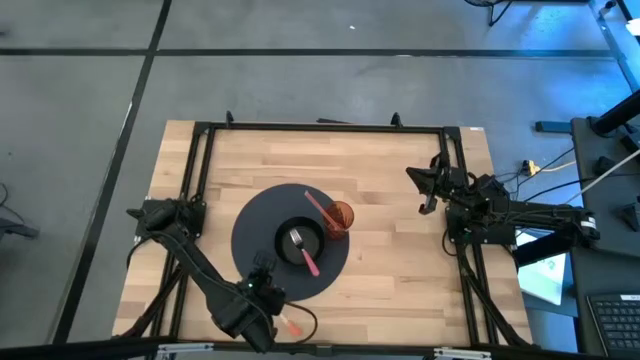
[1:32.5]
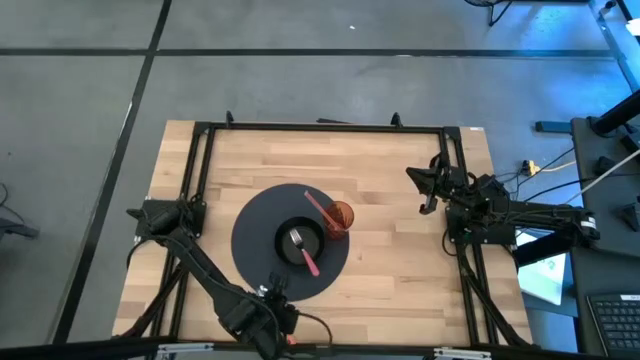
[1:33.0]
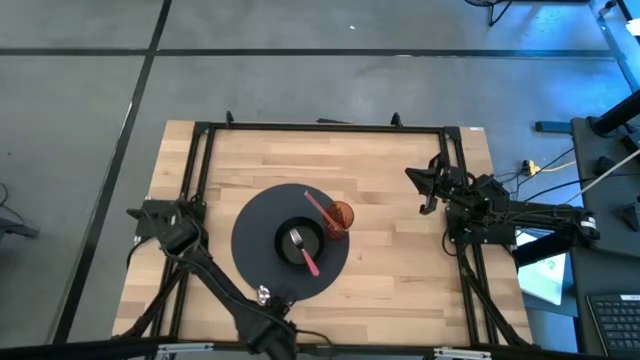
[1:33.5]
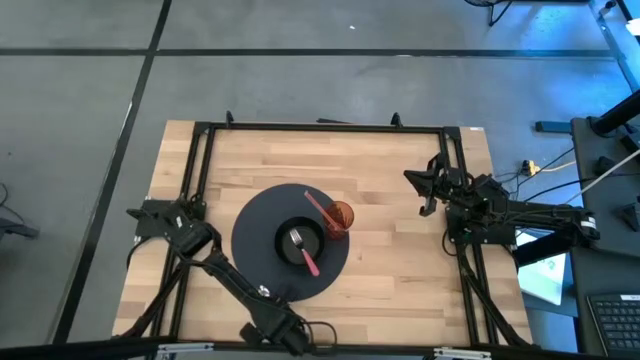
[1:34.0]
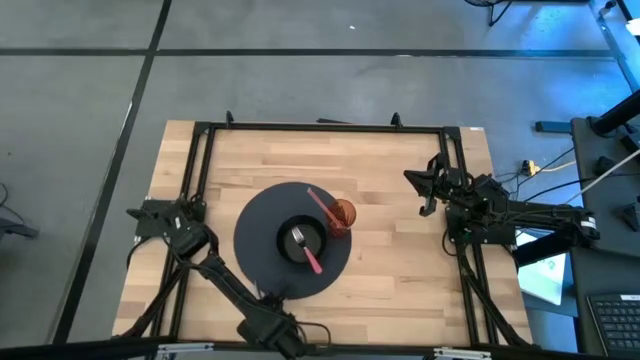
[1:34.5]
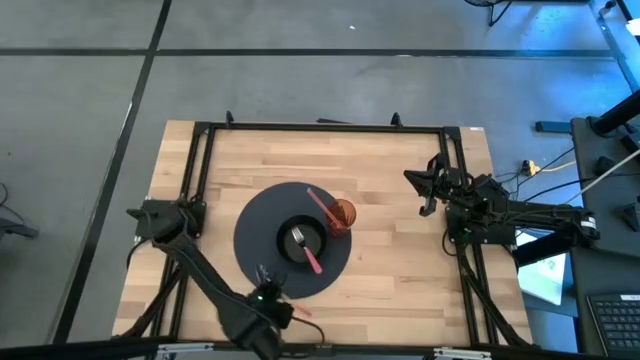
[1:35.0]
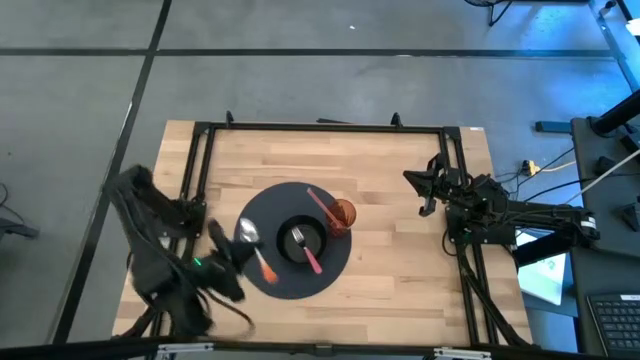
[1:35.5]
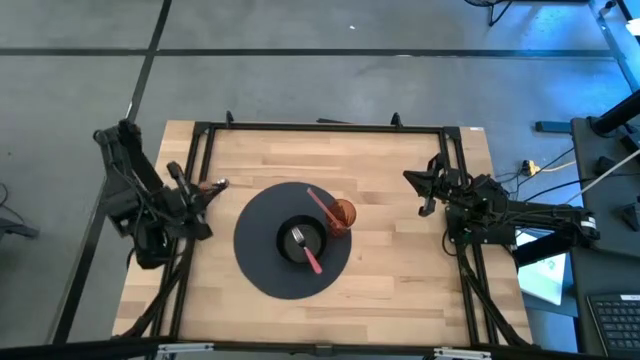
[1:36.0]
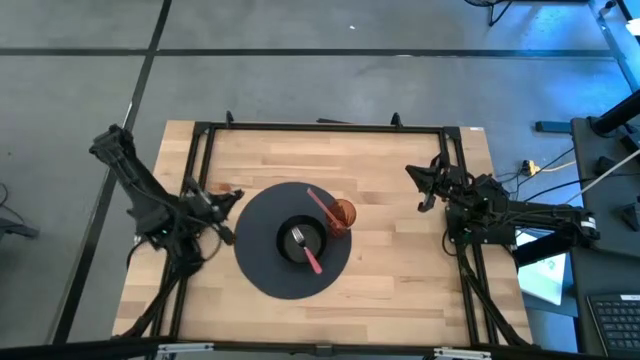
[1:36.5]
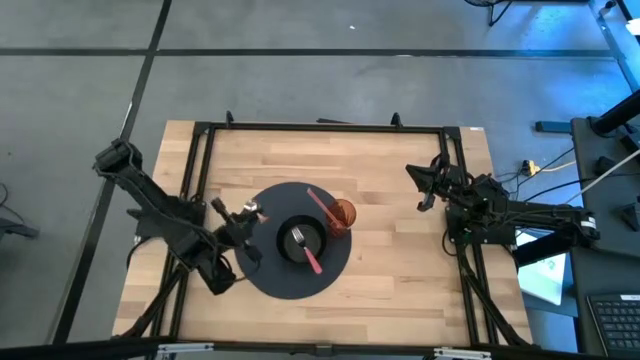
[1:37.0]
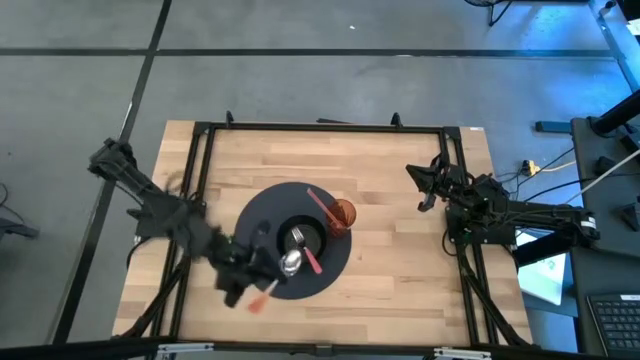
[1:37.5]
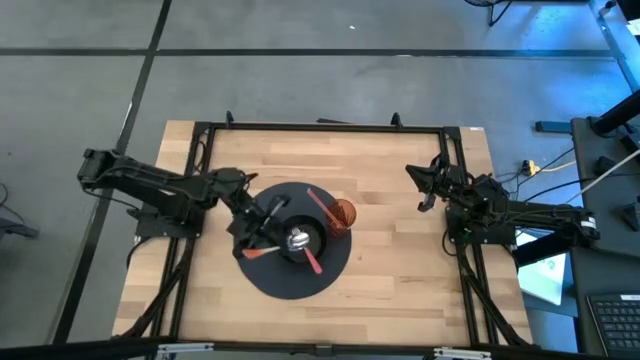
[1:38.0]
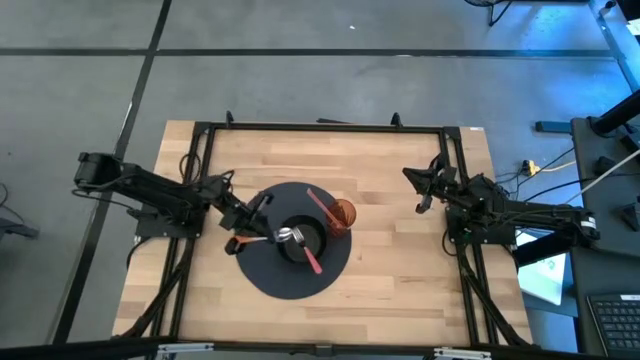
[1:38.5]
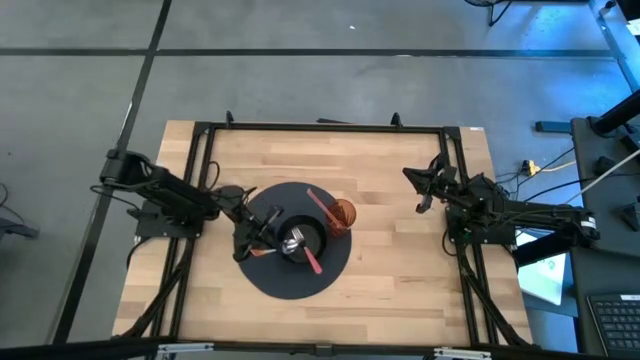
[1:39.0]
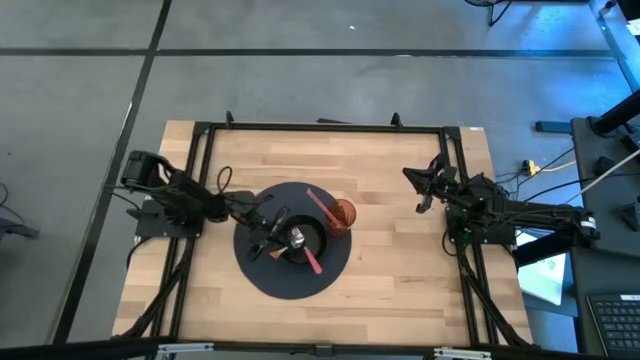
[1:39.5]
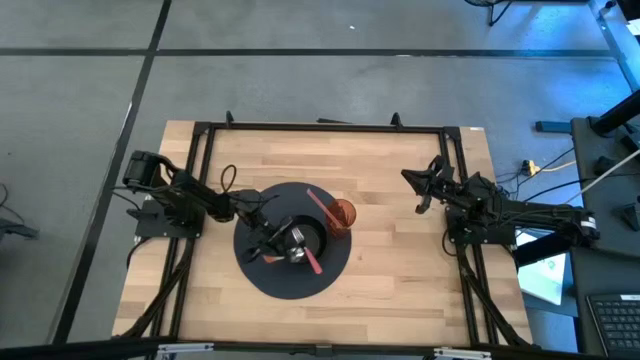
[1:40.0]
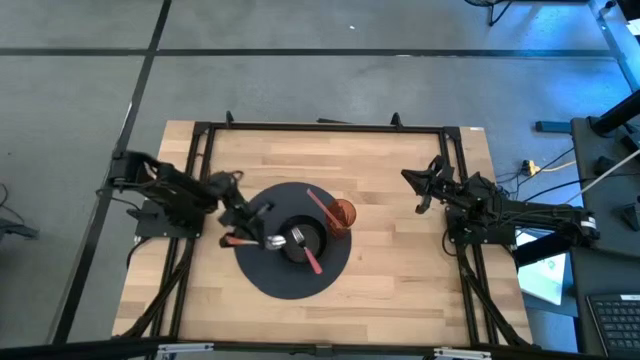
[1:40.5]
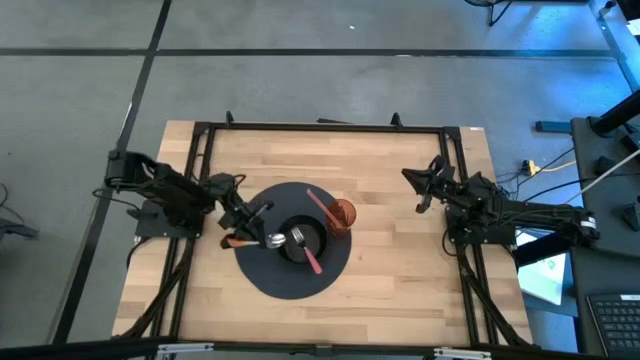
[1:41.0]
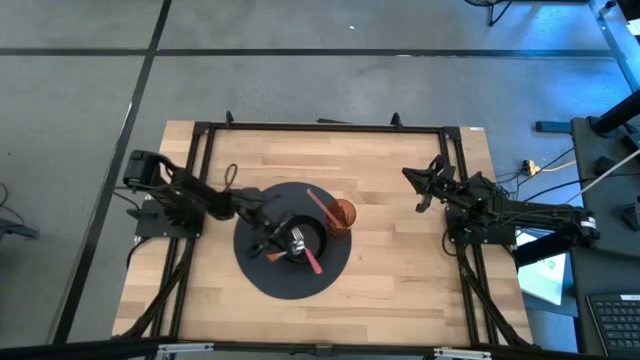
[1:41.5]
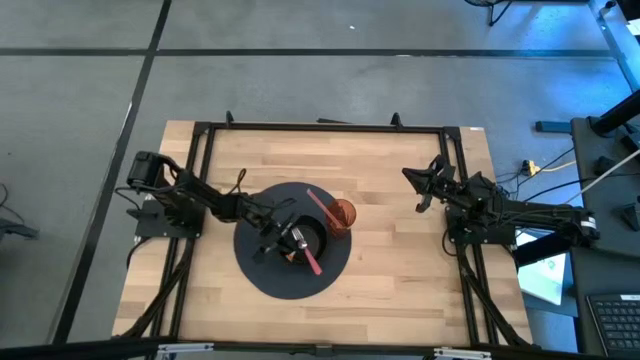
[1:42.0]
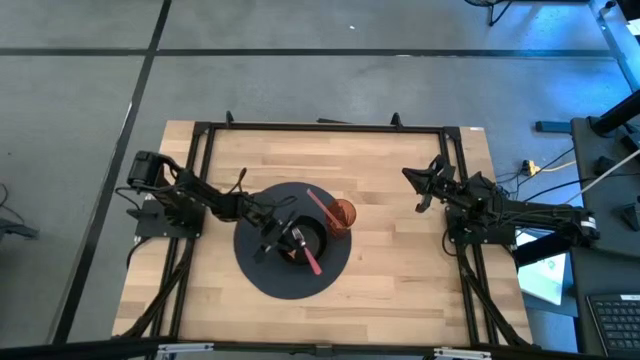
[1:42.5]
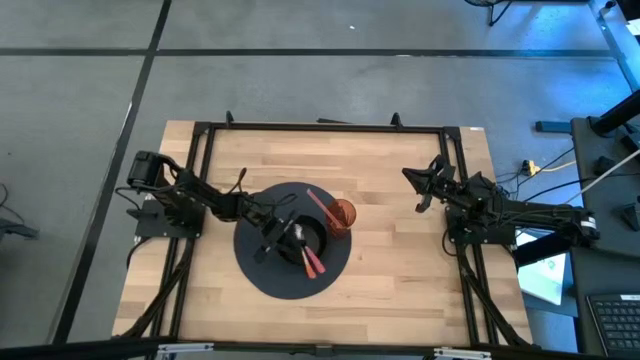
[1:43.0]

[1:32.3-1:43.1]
Task: Pick & Place Utensil
Put the orange spoon into the black bowl

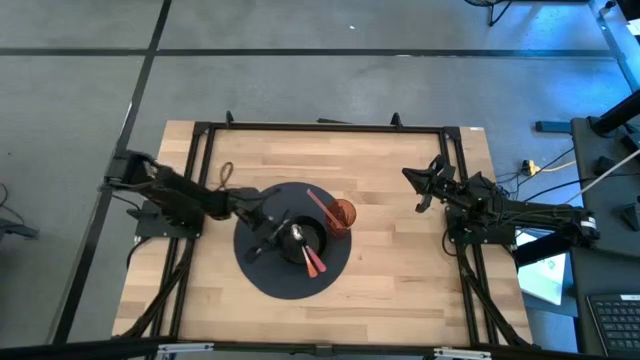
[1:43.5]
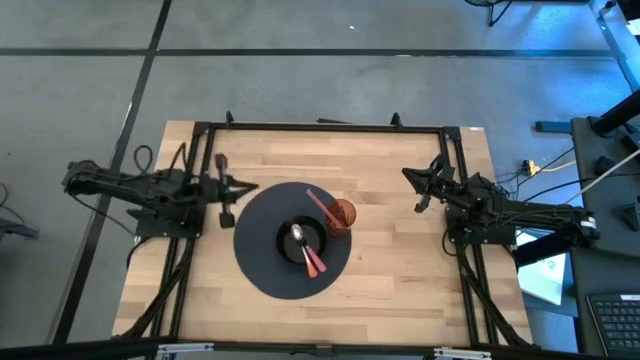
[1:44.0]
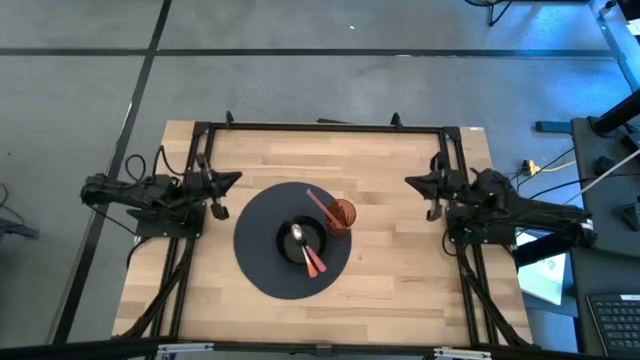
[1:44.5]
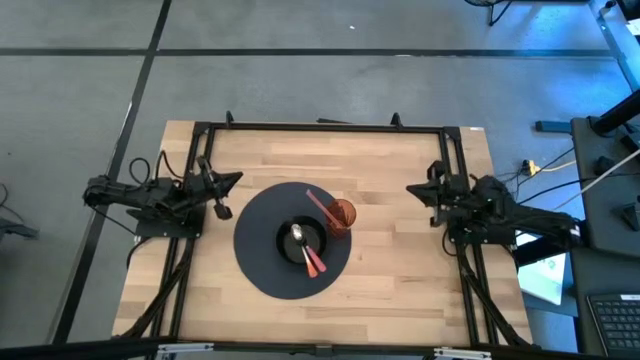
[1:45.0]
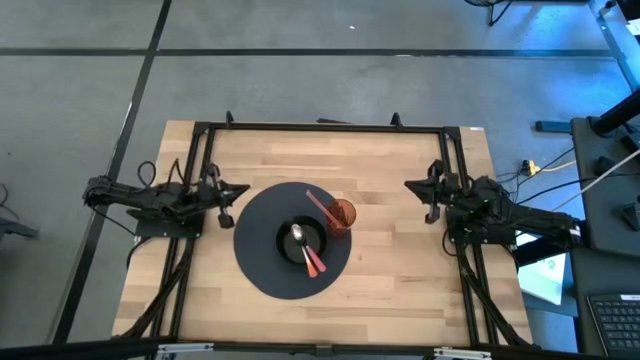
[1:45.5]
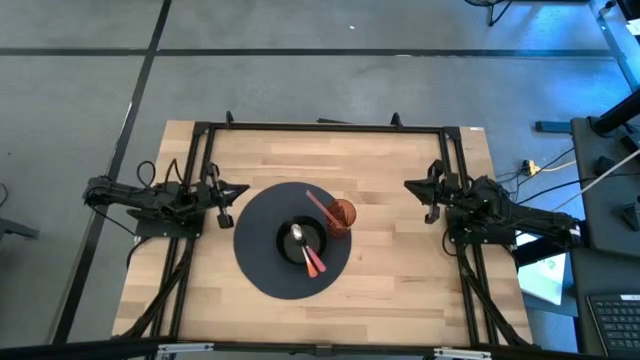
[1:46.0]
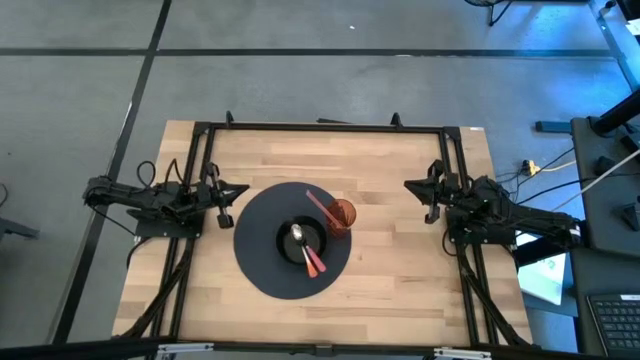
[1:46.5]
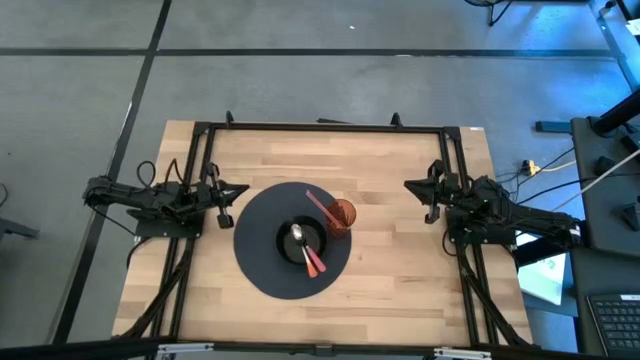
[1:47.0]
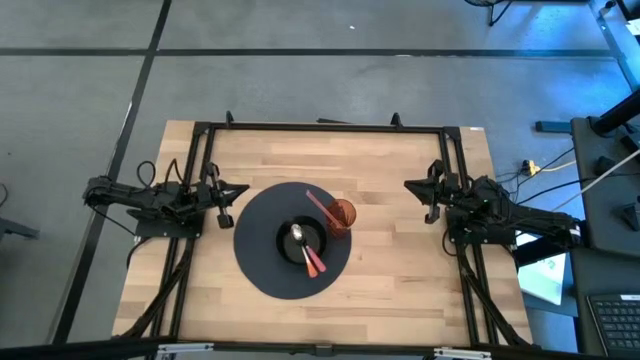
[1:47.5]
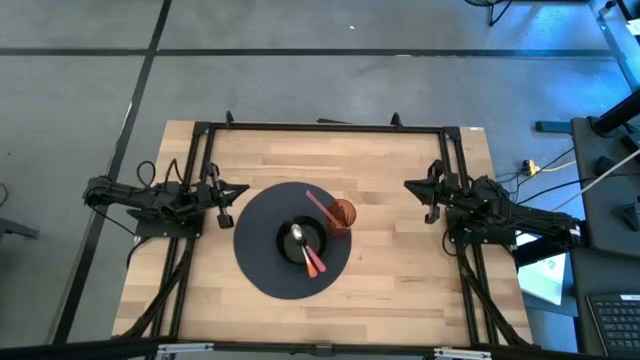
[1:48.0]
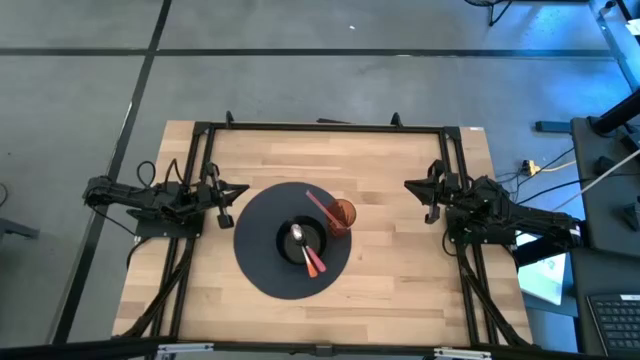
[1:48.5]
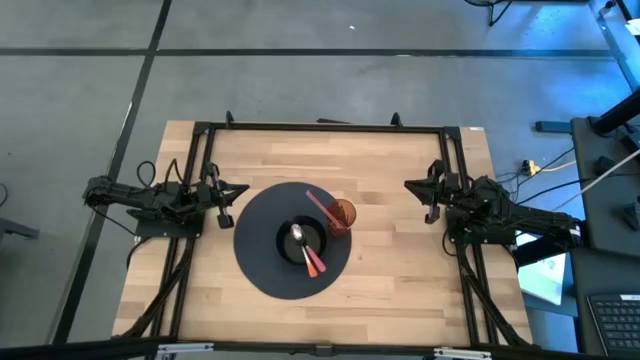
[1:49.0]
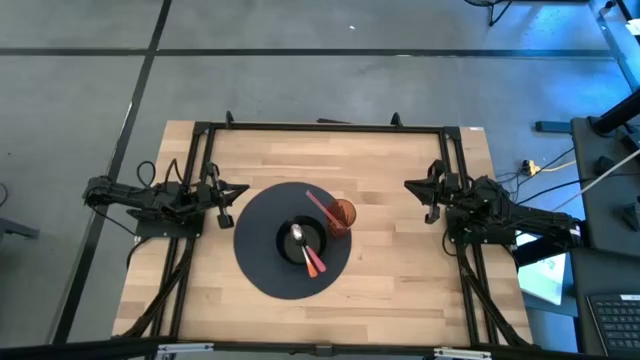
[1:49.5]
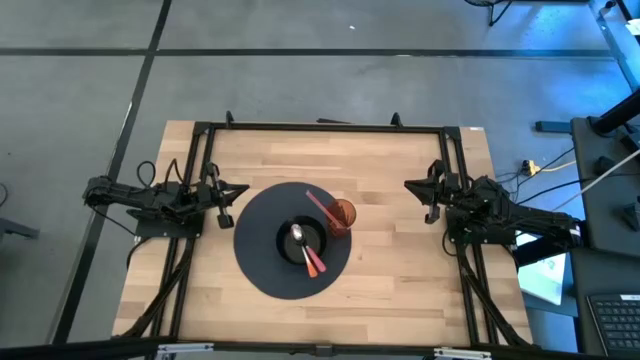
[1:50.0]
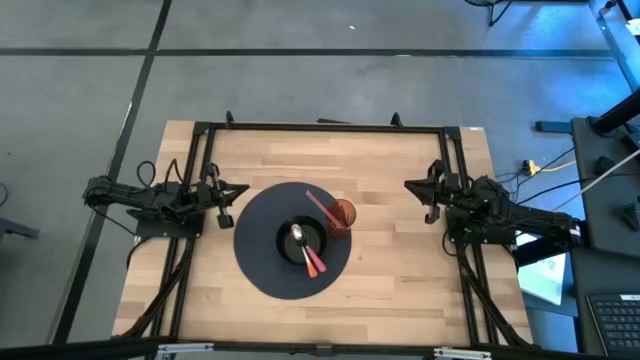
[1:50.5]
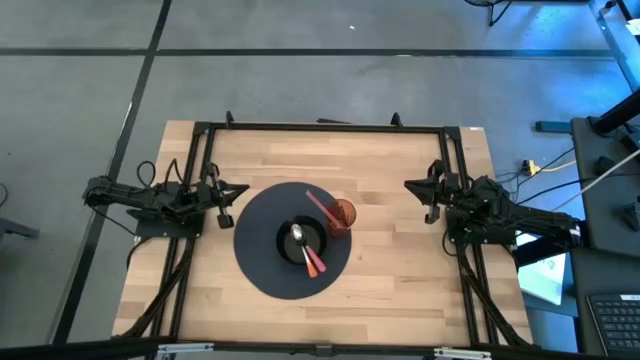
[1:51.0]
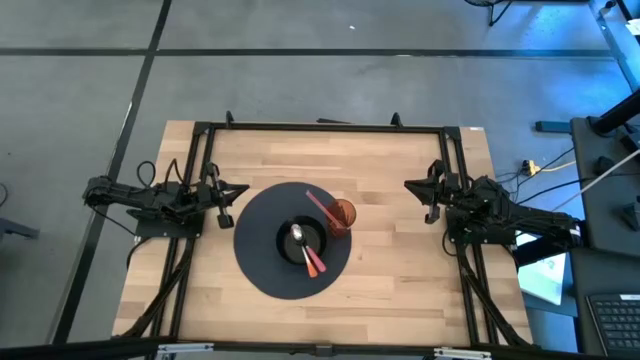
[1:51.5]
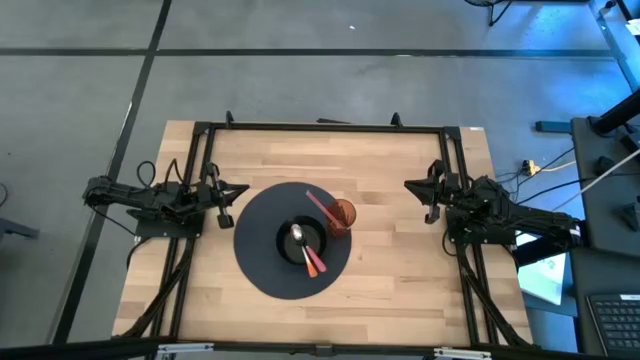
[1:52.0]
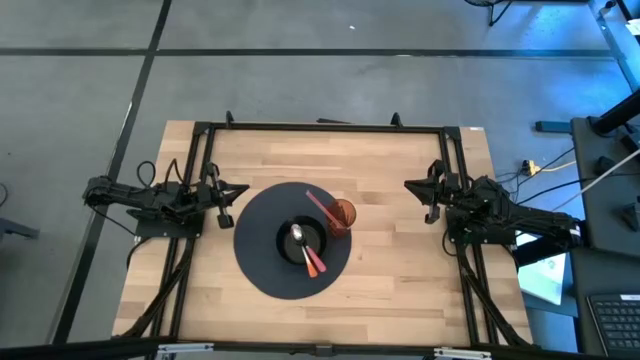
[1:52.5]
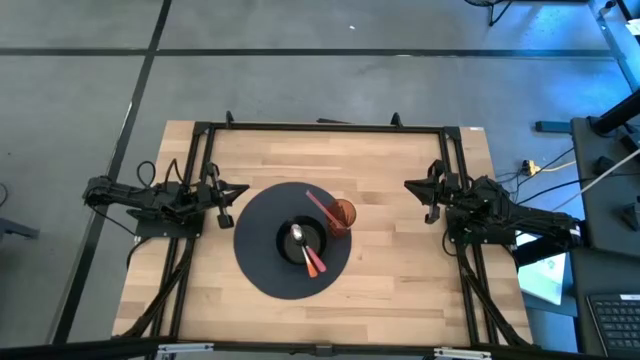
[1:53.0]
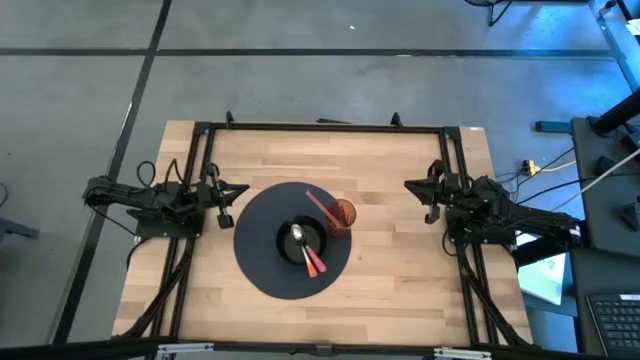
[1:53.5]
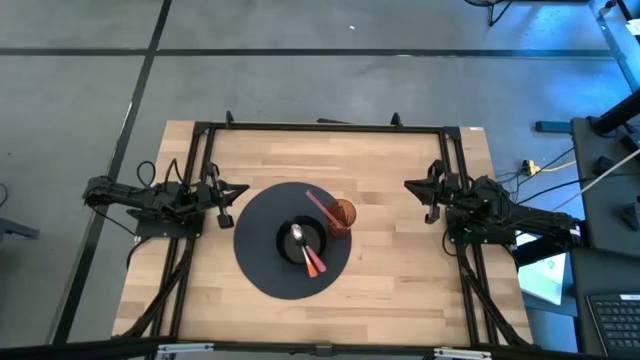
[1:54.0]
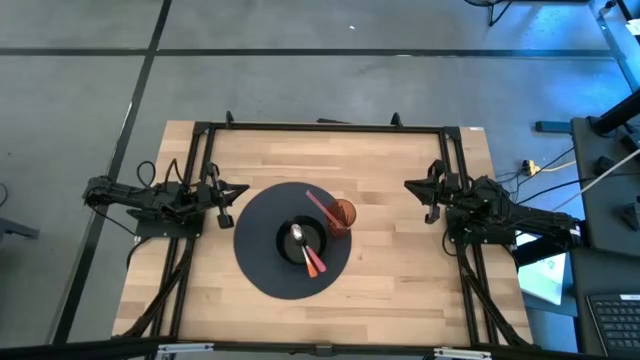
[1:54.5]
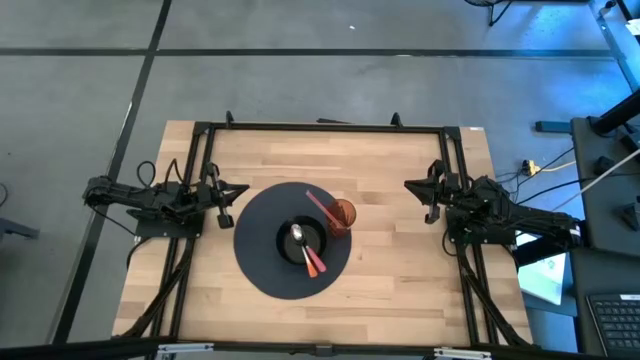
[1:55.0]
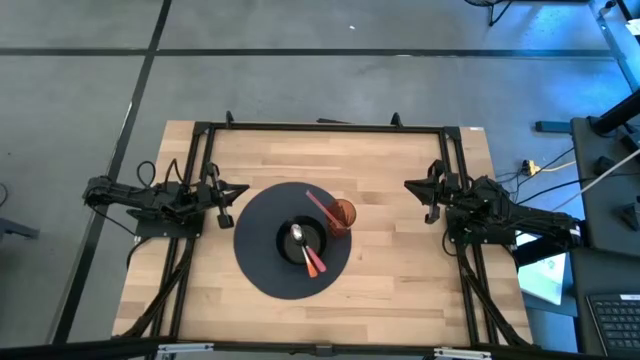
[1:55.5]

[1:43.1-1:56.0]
Return to Home Position
